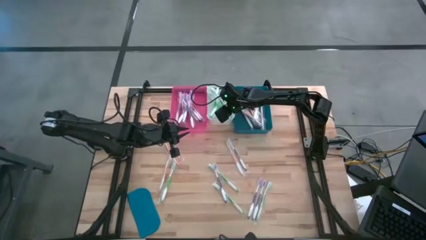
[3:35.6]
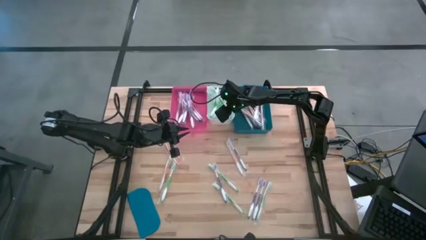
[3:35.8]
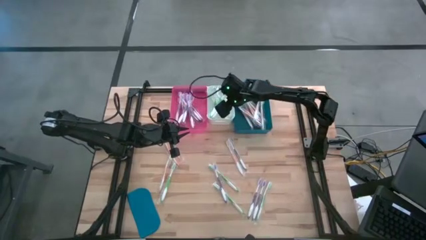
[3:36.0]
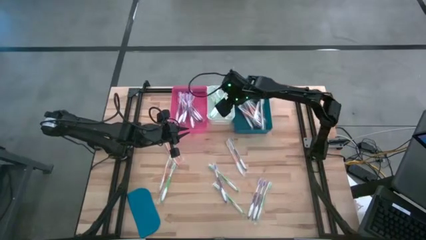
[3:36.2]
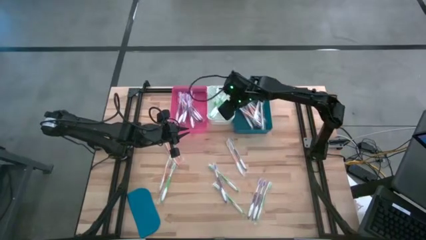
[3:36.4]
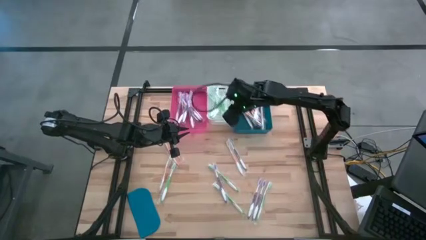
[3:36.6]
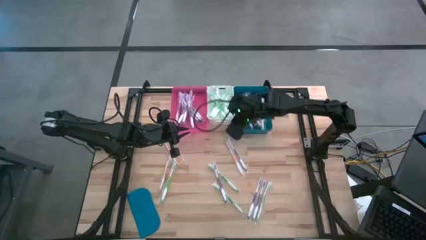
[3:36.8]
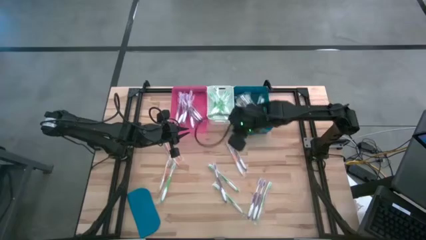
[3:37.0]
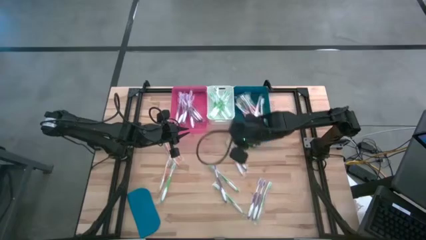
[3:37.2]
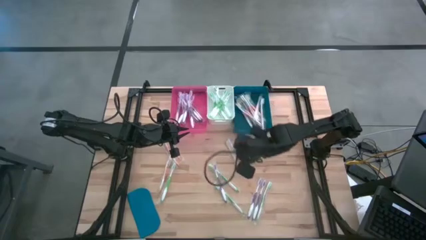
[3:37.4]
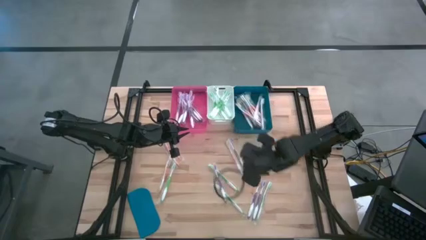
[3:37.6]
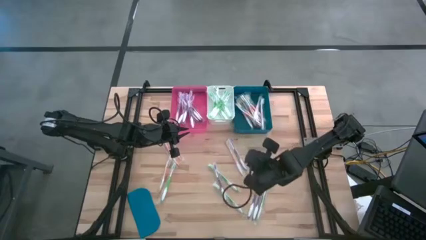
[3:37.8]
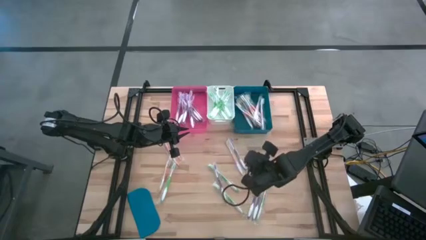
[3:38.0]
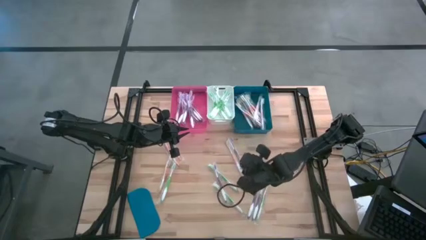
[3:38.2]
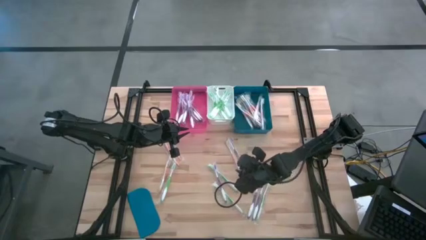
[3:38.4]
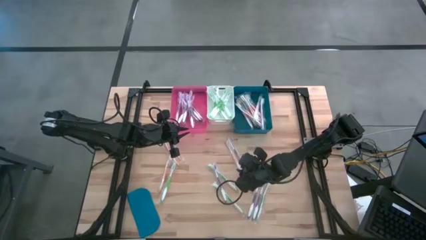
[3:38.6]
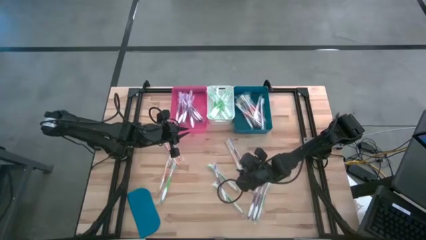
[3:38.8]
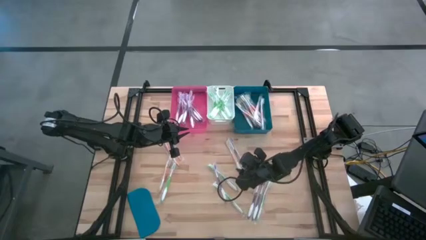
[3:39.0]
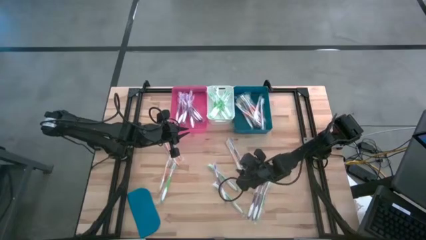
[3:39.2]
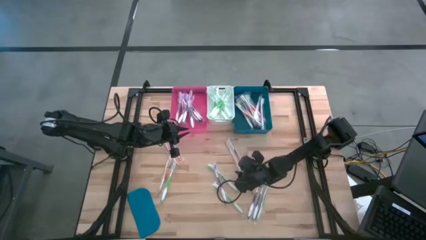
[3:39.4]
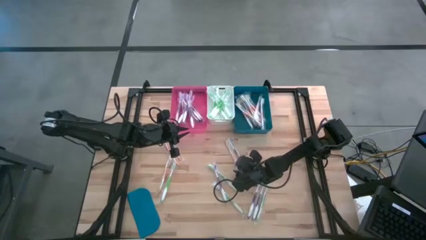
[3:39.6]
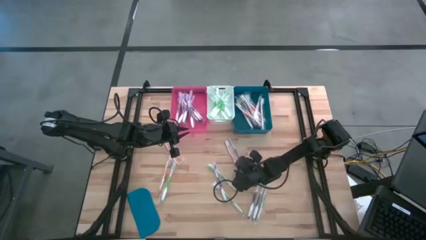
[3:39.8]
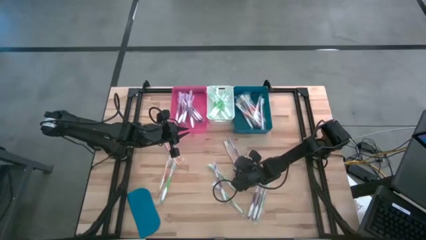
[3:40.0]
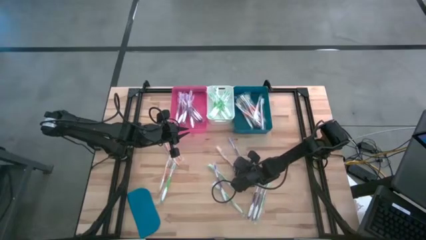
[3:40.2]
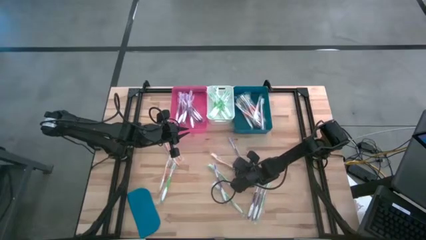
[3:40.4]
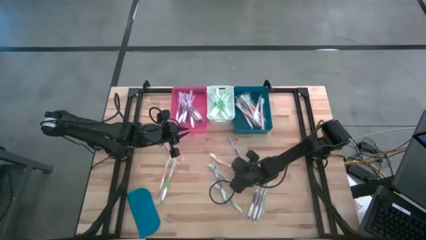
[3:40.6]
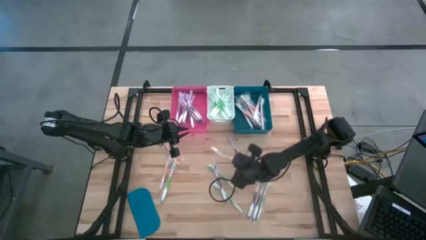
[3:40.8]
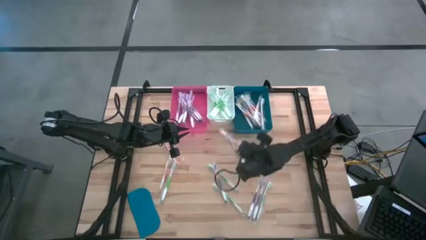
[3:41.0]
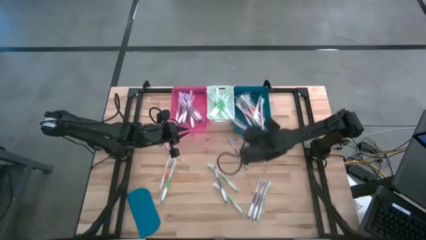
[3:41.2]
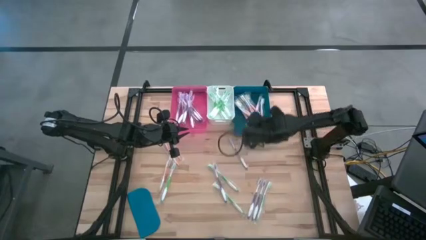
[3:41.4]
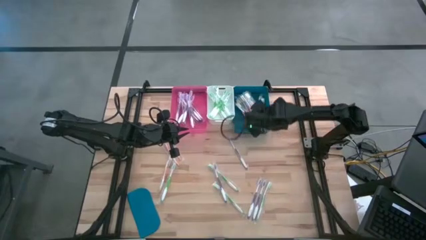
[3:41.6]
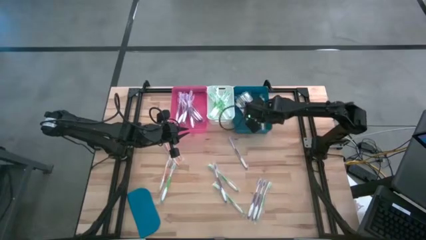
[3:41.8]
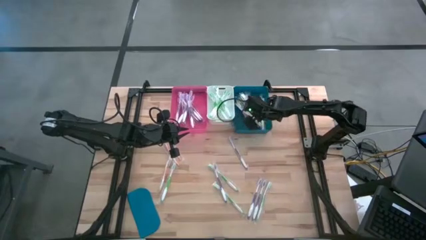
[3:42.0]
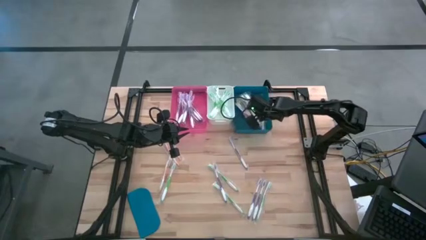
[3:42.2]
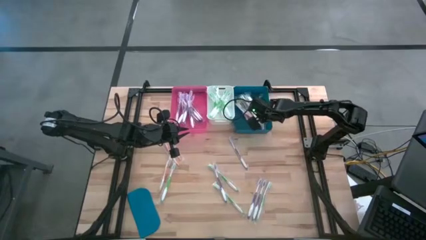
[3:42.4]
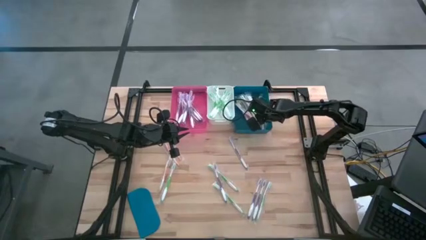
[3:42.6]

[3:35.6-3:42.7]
Task: Pick & Place Toothbrushes
Put the orange toothbrush into the blue bin

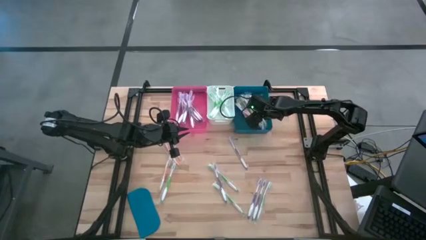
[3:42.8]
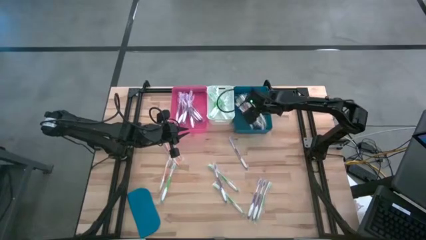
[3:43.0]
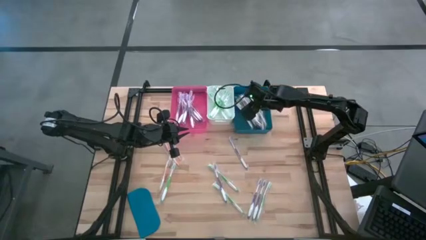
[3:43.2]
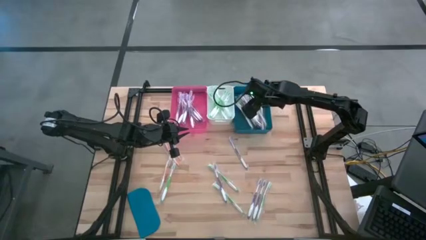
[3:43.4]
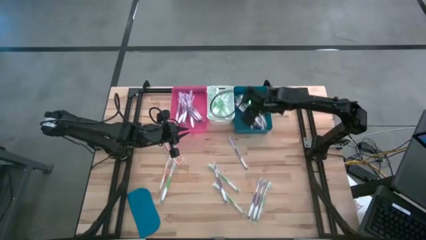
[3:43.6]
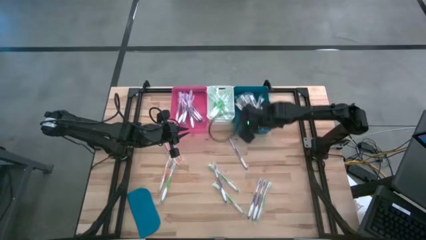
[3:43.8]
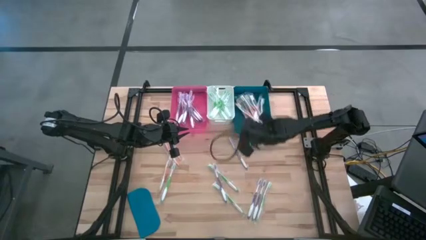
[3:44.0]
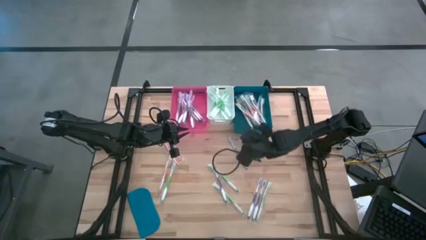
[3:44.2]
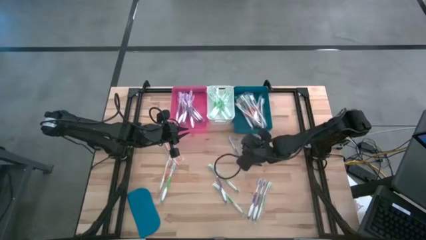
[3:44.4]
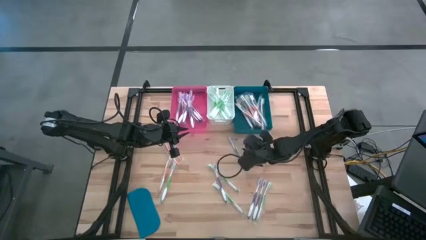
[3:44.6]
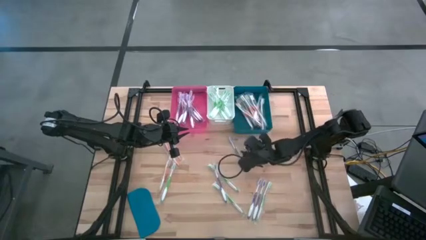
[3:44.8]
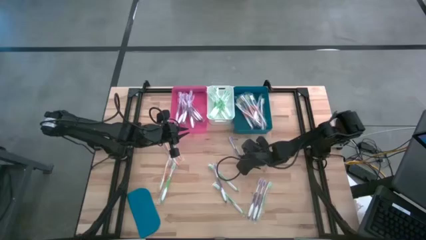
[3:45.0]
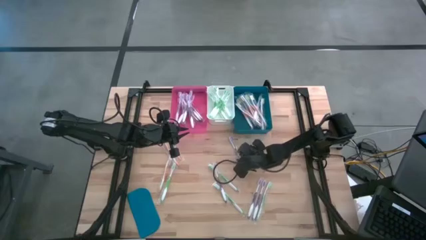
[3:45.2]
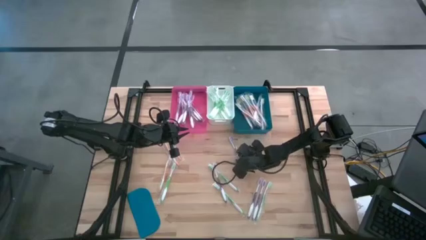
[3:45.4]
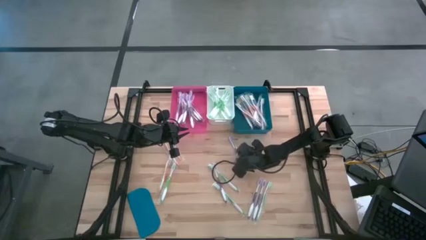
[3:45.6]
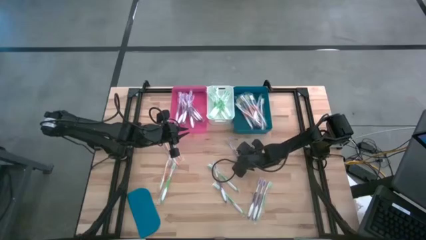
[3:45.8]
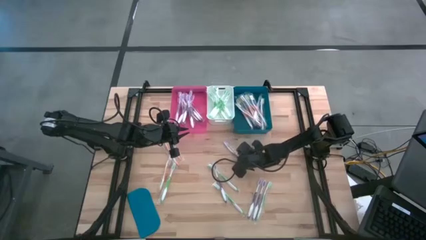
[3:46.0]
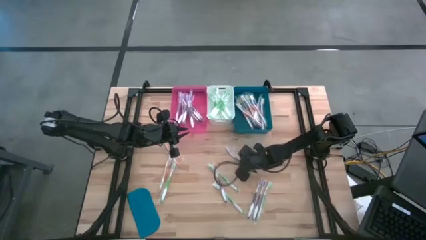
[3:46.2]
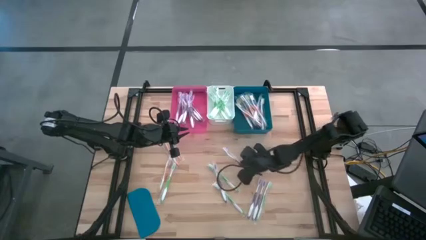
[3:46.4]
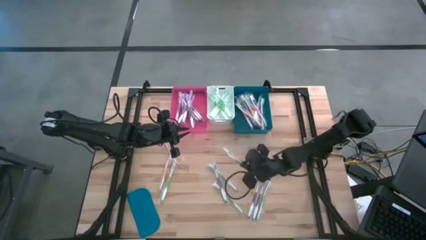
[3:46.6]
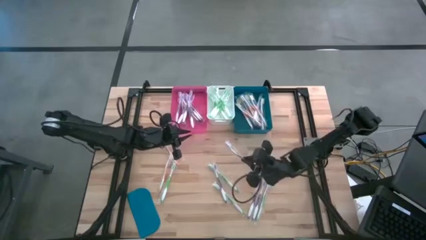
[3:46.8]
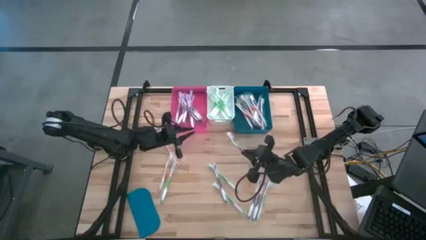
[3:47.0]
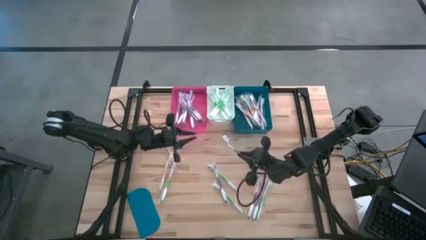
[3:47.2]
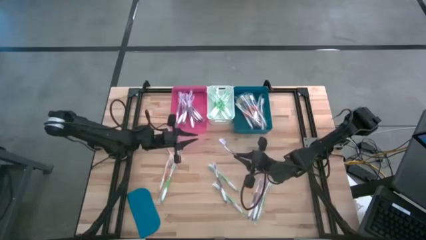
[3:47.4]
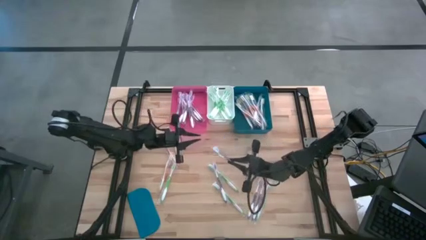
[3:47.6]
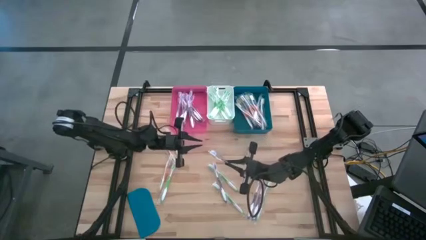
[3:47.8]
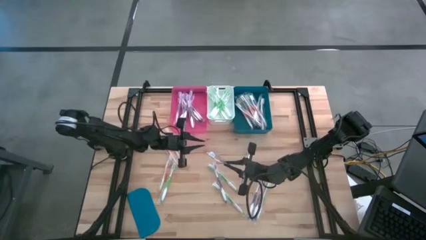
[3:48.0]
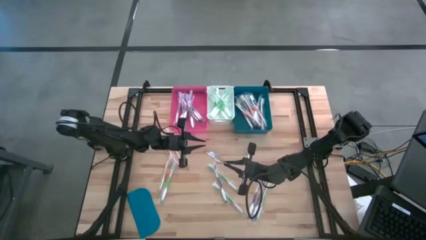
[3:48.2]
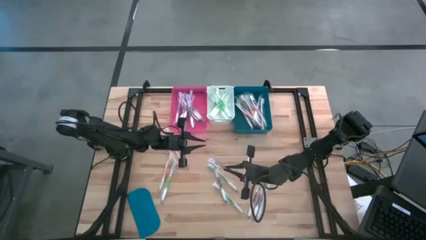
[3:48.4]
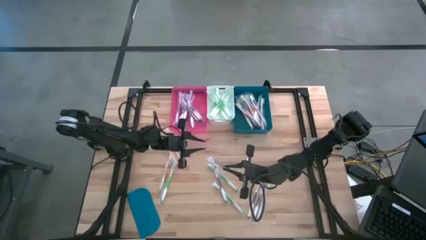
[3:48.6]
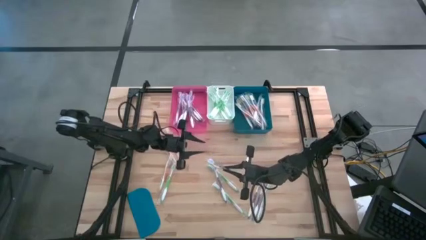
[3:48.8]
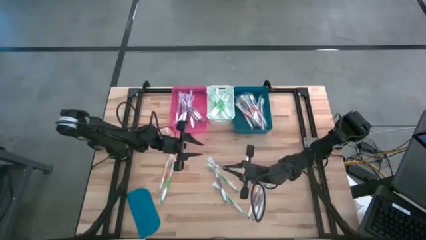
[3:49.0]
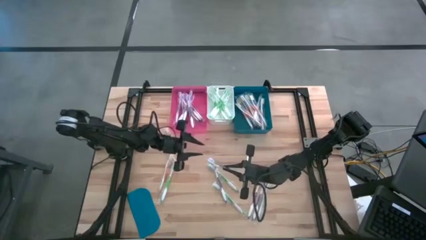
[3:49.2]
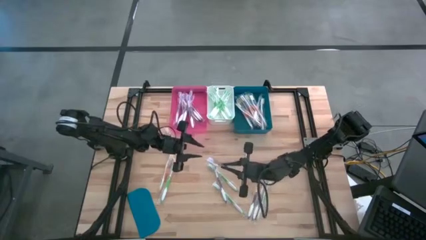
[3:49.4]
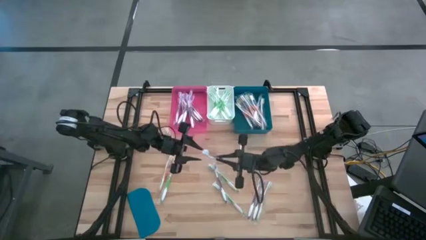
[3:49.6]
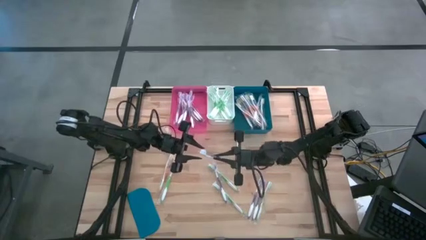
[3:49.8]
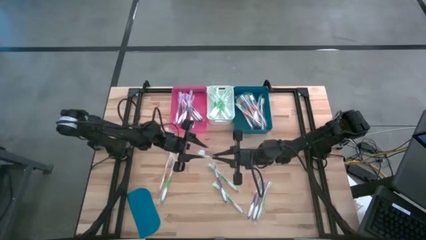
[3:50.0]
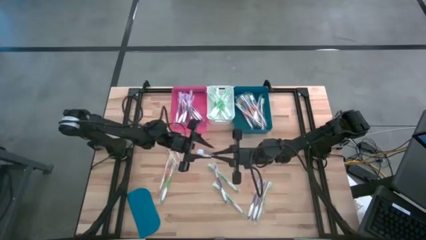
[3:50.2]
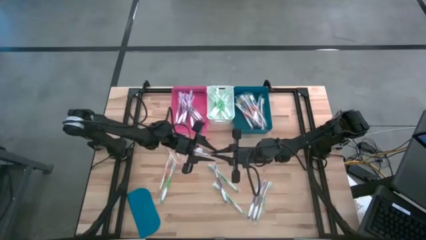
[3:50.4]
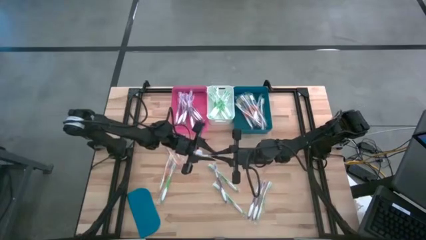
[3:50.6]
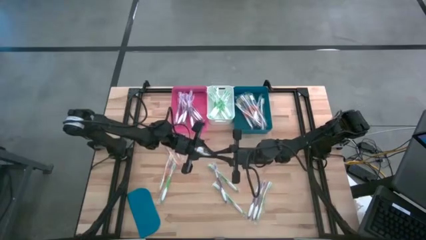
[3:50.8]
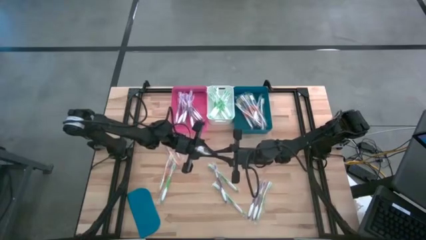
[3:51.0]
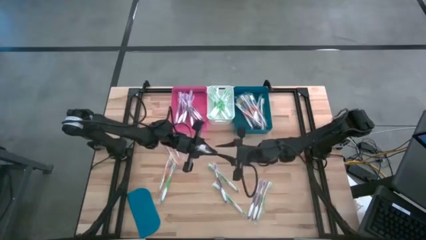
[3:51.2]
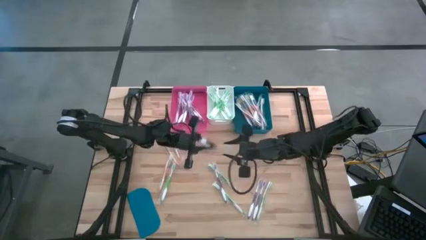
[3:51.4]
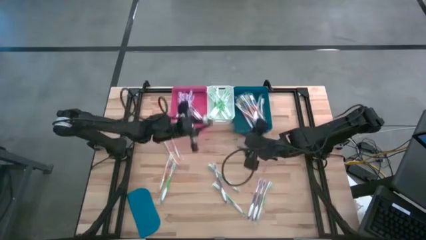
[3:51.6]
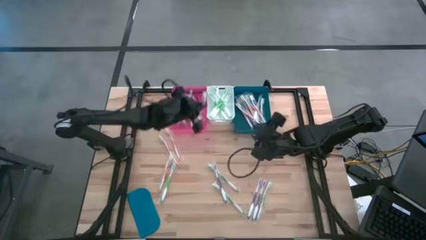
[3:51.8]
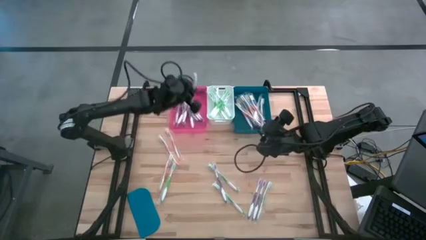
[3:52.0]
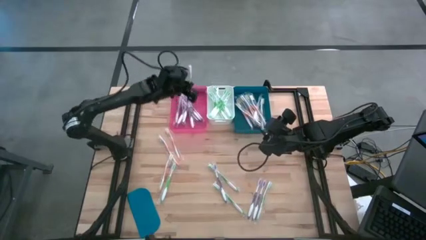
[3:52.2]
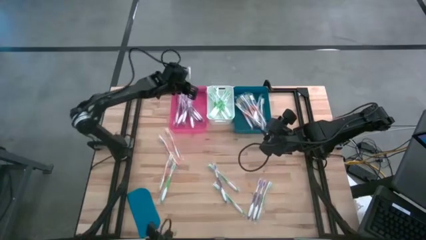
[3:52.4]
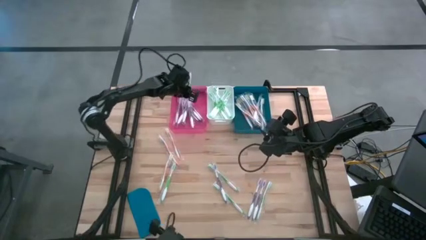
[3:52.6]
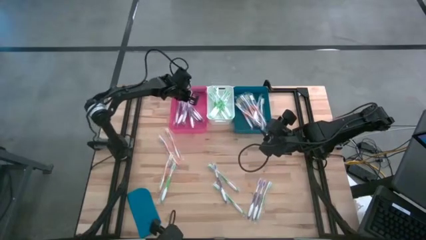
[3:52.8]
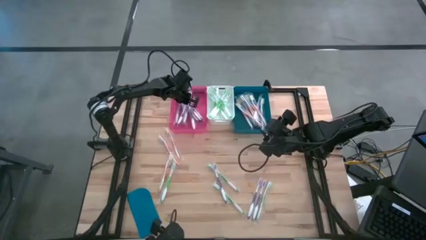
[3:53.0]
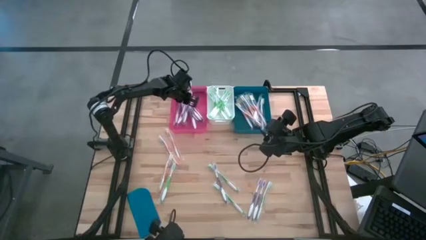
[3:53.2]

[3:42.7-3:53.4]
Put the violet toothbrush into the pink bin
